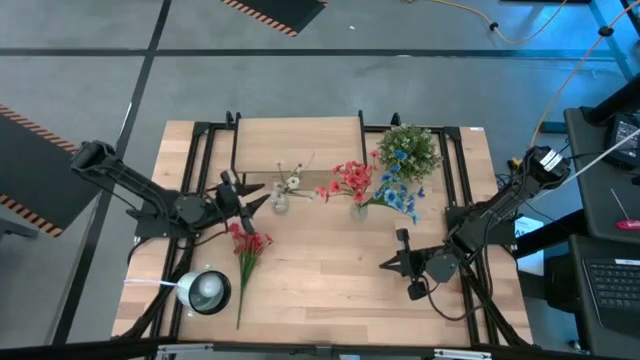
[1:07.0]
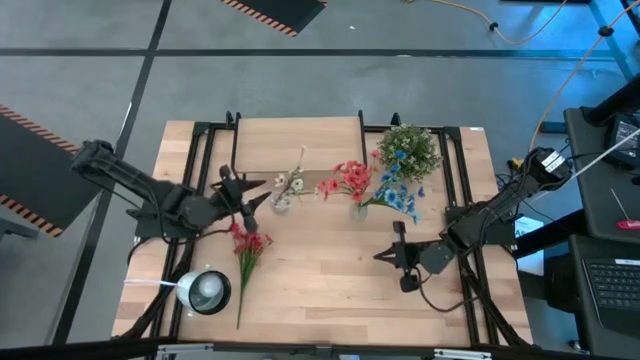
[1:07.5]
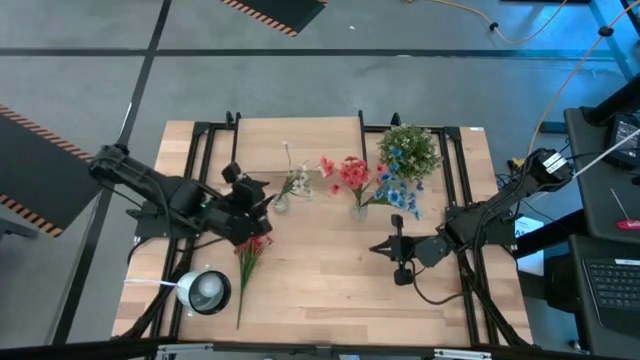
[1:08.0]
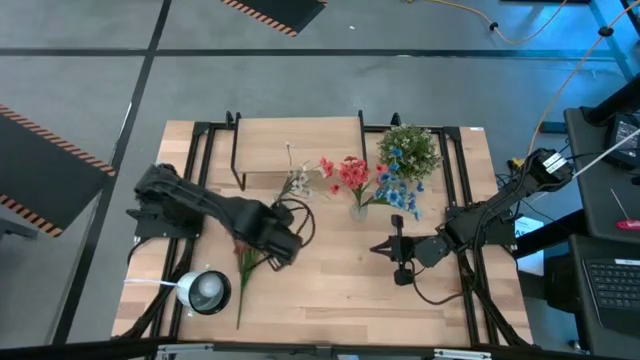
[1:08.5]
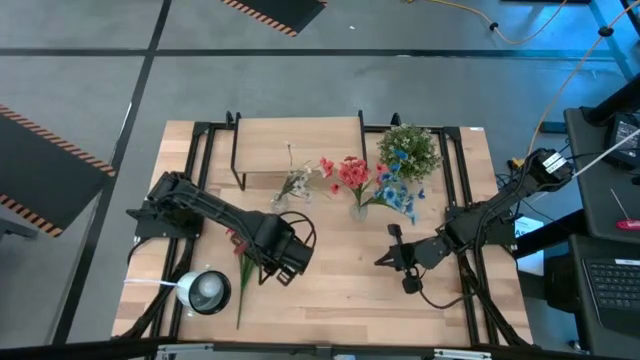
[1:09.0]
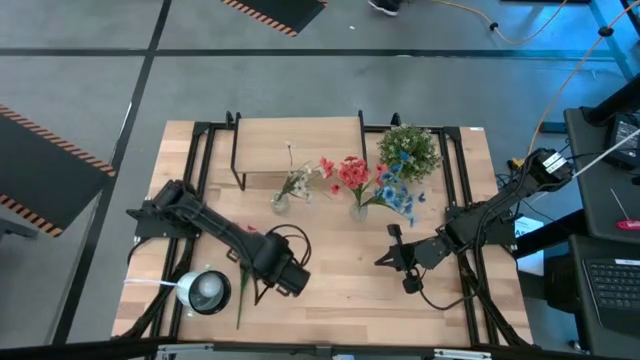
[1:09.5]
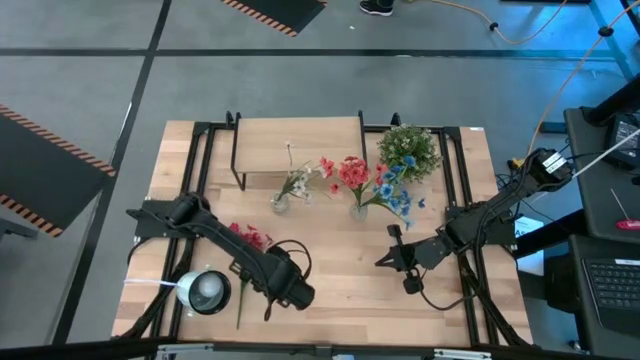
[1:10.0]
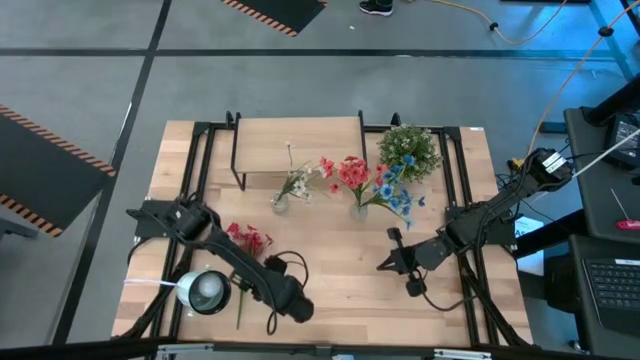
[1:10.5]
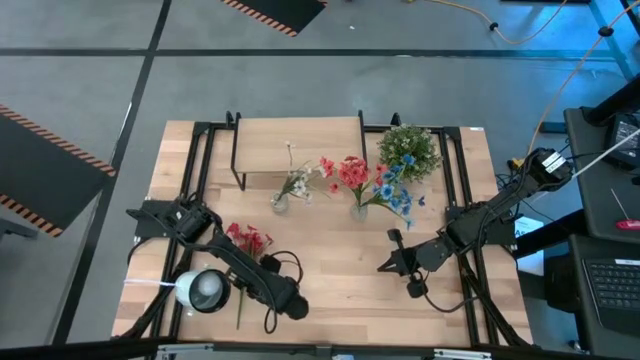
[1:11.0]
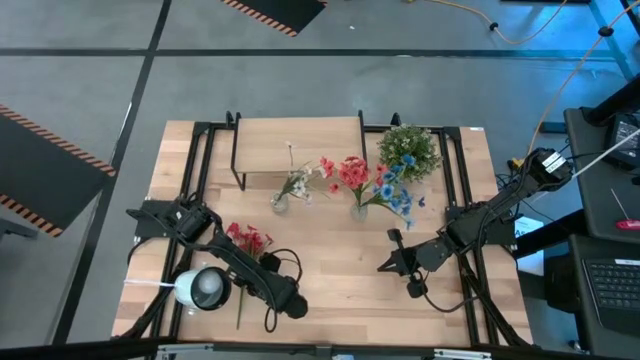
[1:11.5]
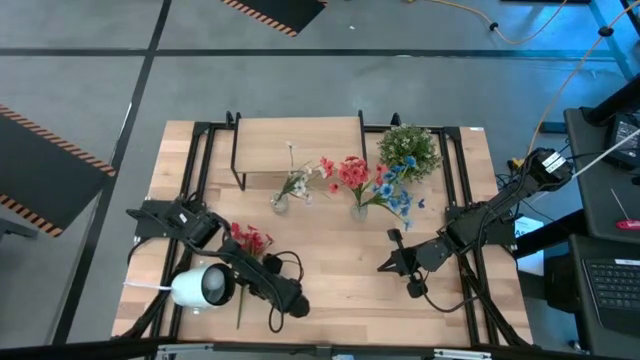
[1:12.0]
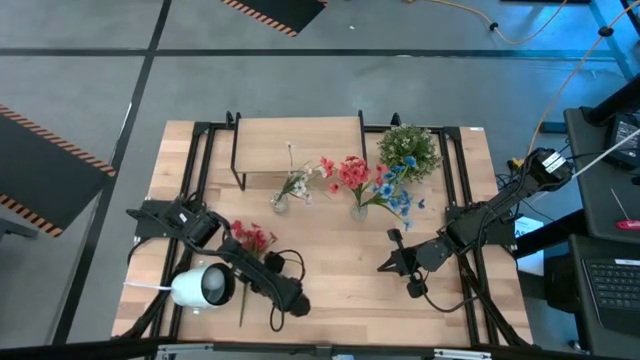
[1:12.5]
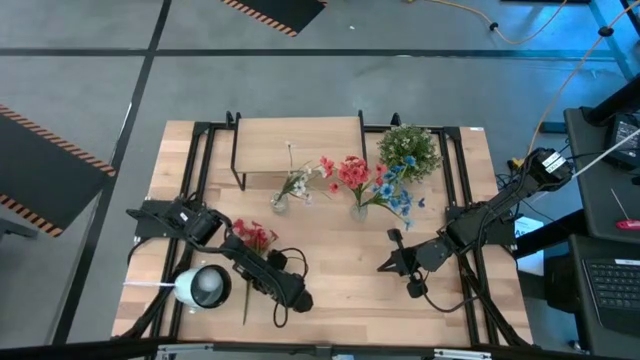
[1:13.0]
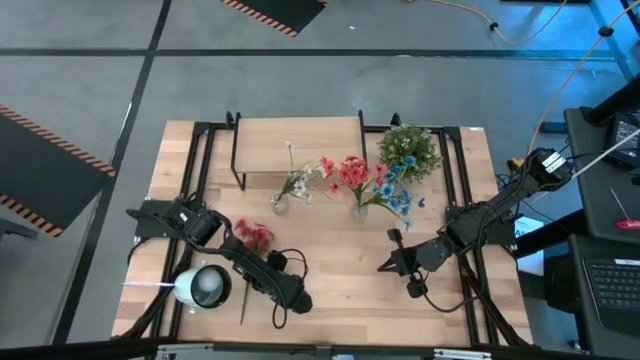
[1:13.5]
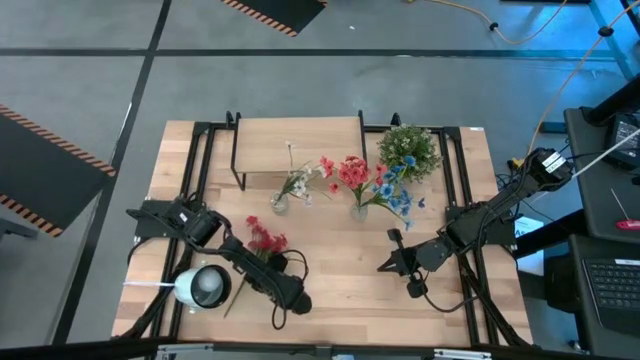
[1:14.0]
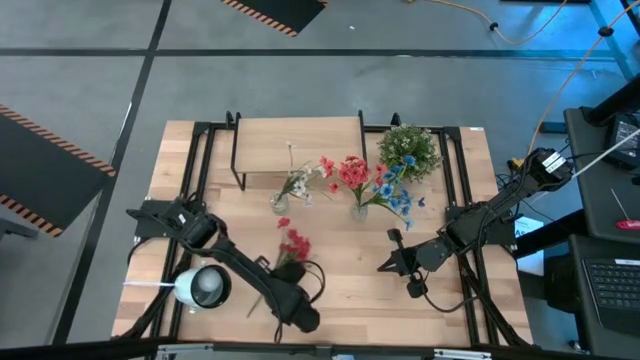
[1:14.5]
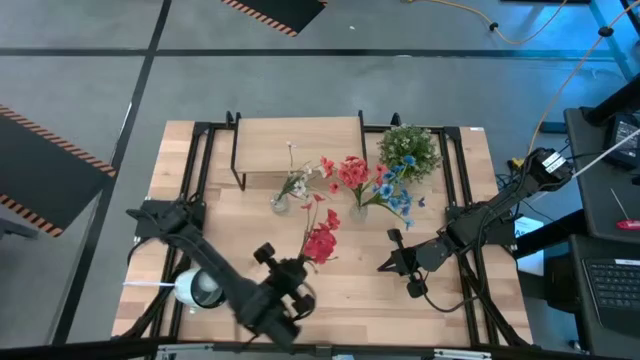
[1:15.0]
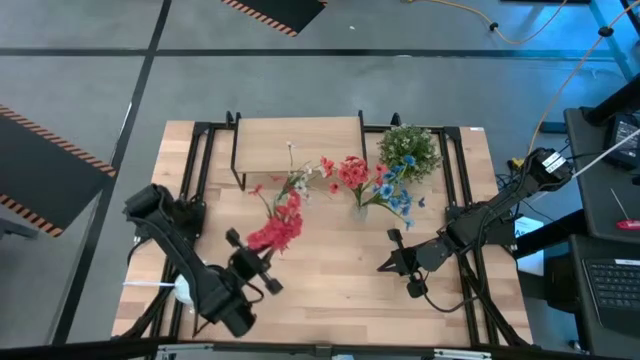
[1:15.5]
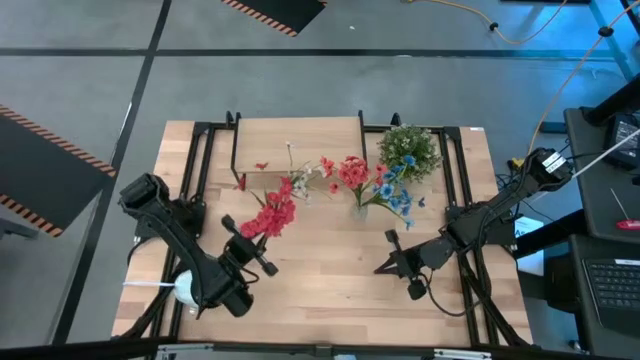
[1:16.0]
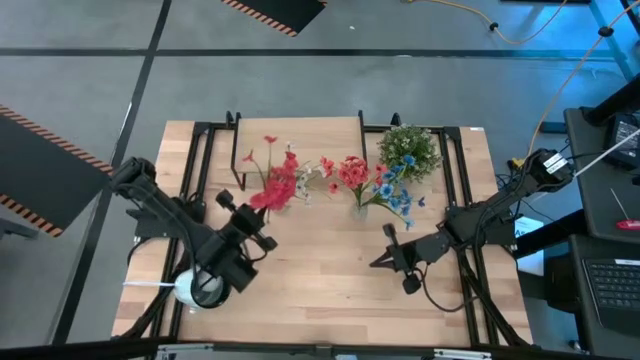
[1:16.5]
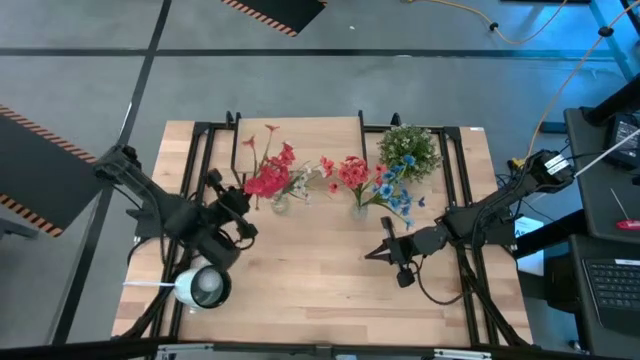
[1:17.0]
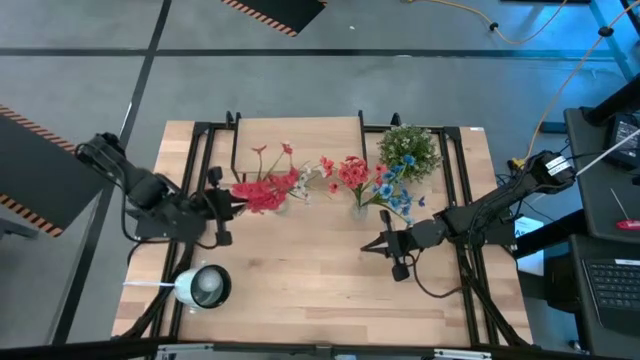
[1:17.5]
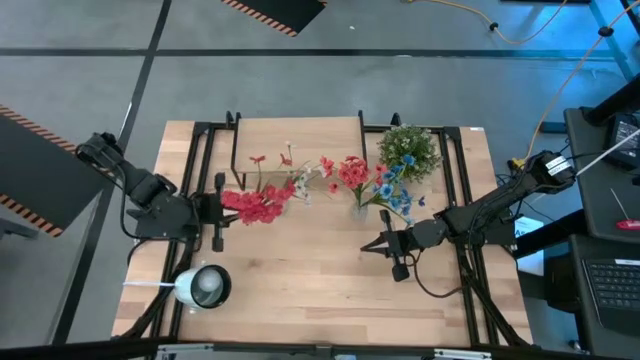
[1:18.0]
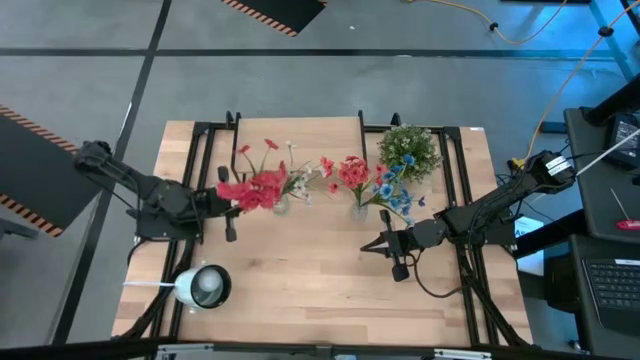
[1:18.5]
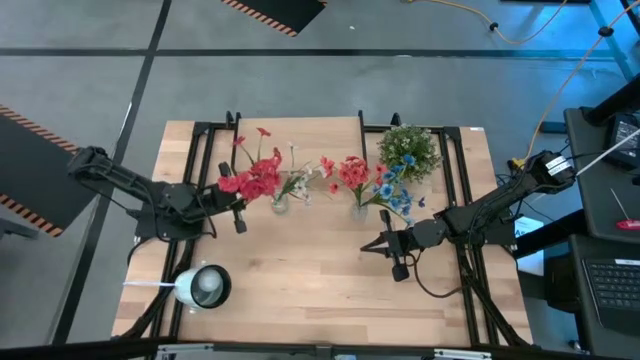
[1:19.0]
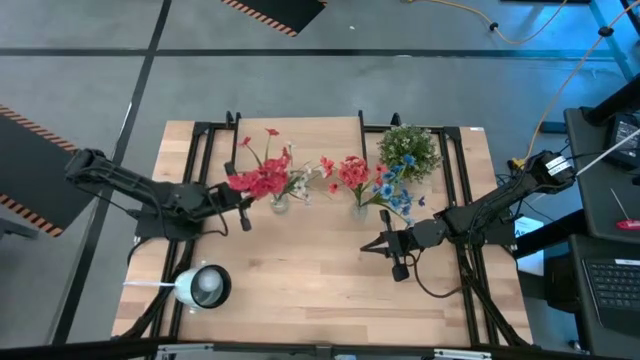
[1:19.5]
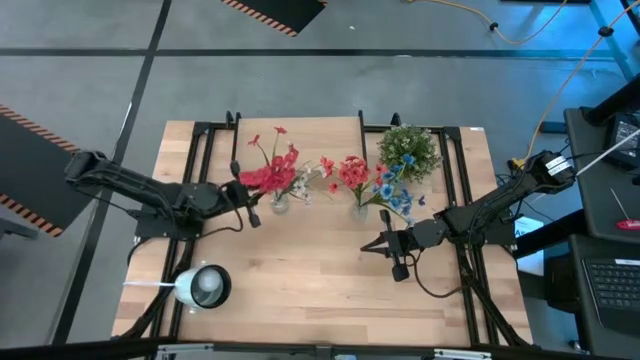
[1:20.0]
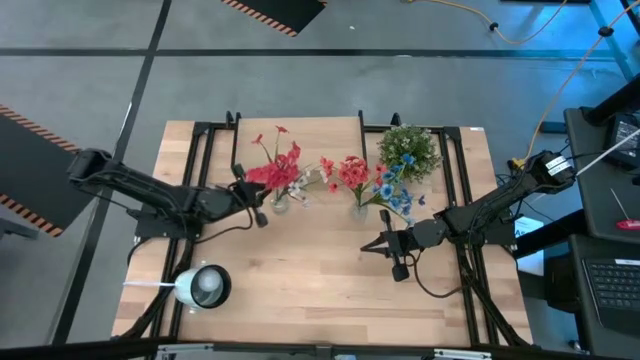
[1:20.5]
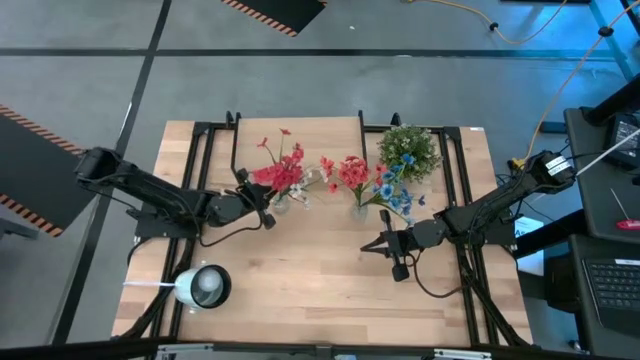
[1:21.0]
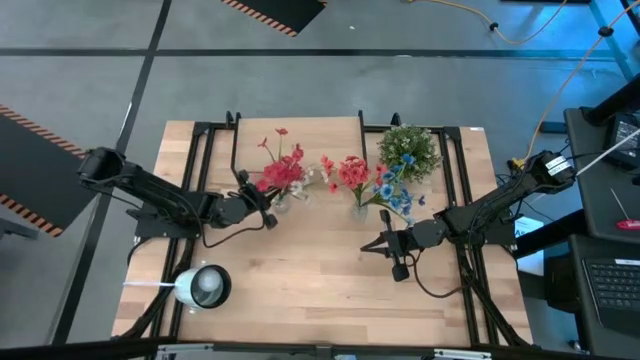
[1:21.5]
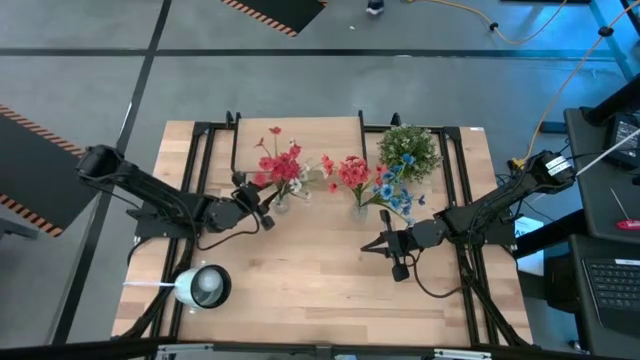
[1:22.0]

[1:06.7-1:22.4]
Task: Pick and place flowers into a vace then onto a shelf
Put the red flowers into the left transparent vase

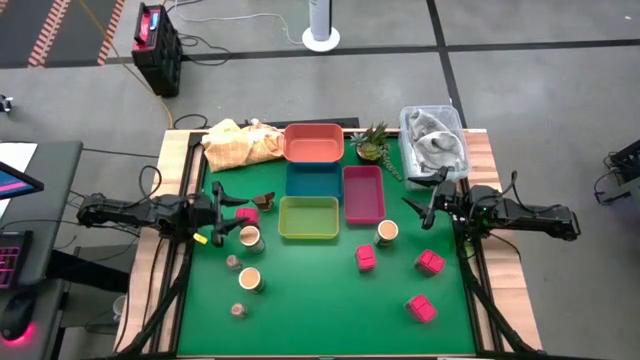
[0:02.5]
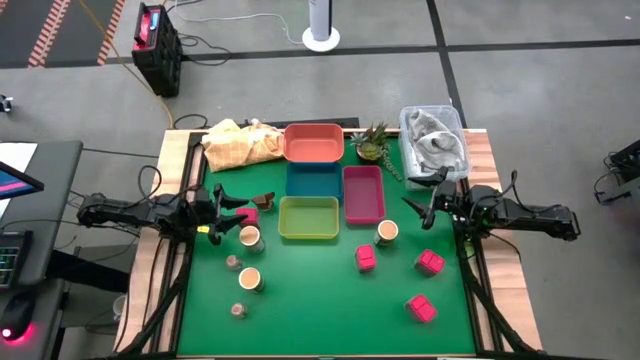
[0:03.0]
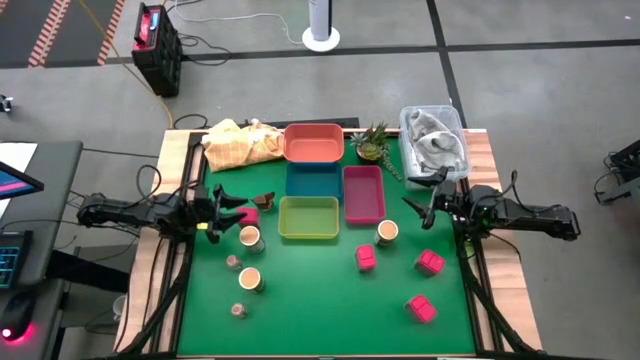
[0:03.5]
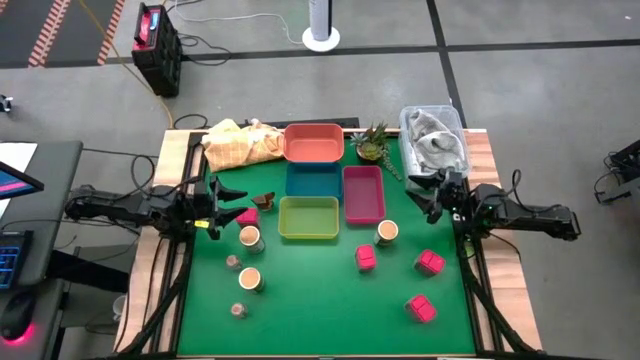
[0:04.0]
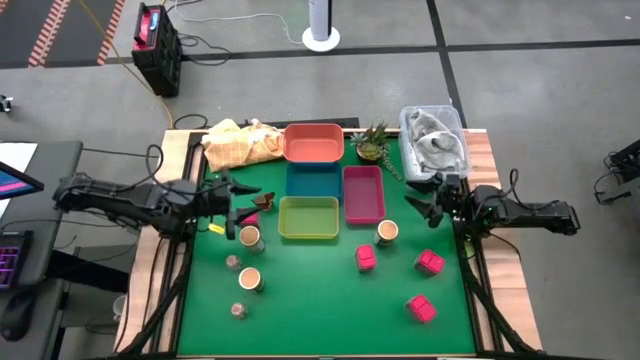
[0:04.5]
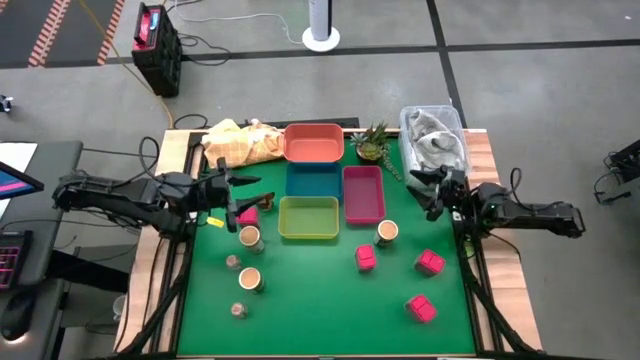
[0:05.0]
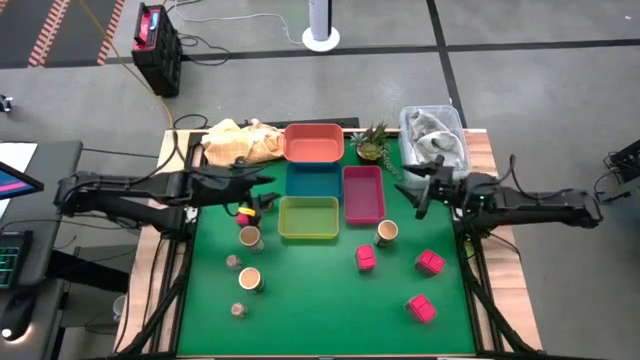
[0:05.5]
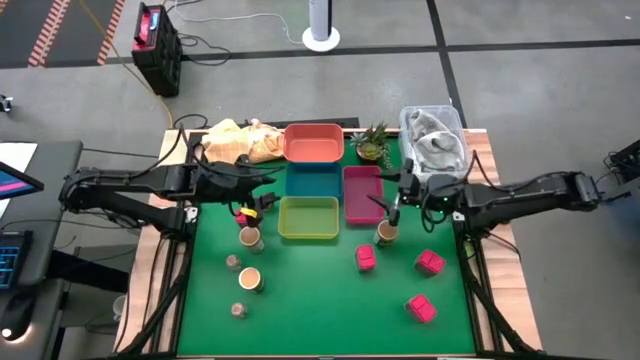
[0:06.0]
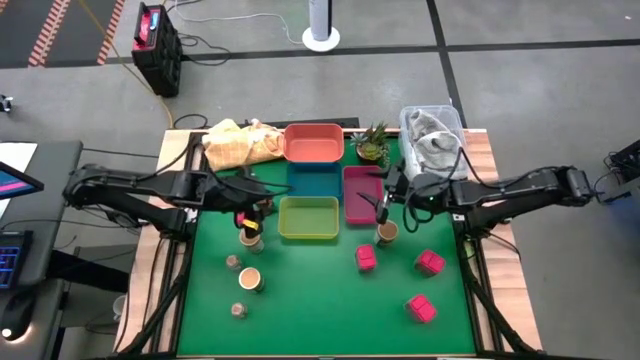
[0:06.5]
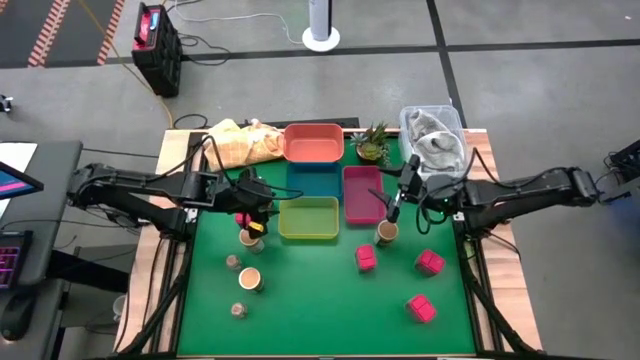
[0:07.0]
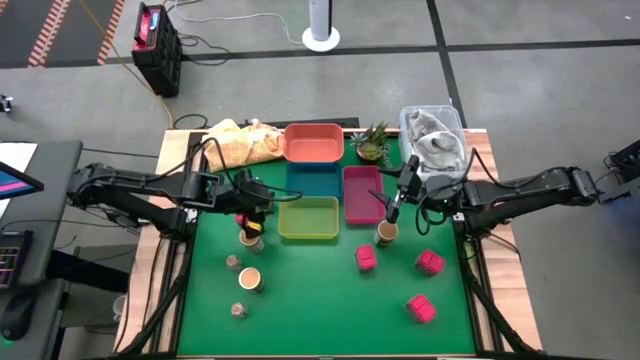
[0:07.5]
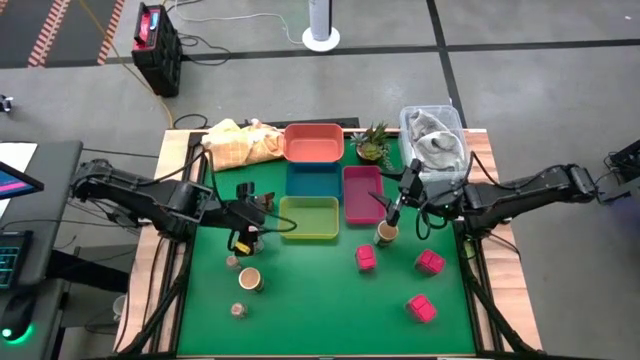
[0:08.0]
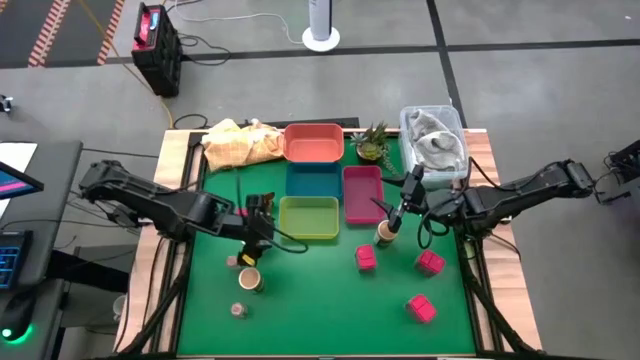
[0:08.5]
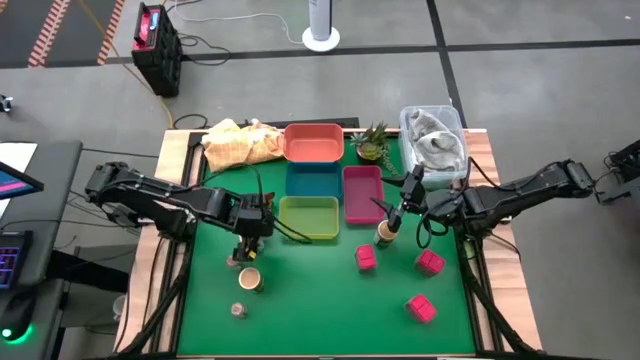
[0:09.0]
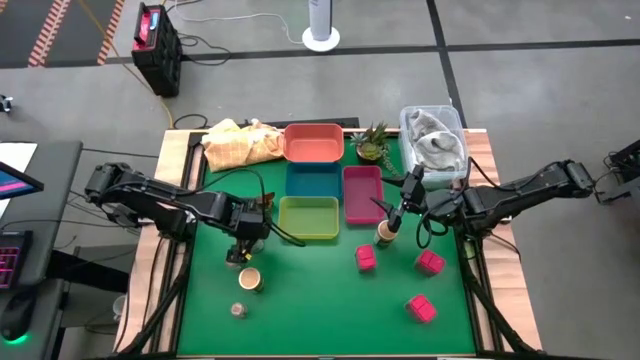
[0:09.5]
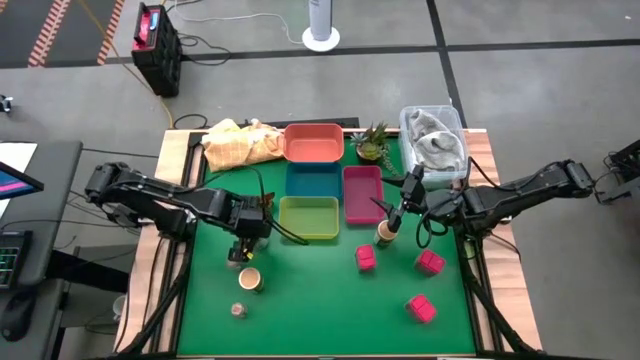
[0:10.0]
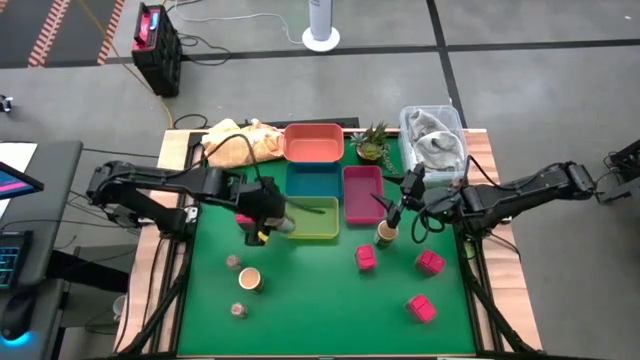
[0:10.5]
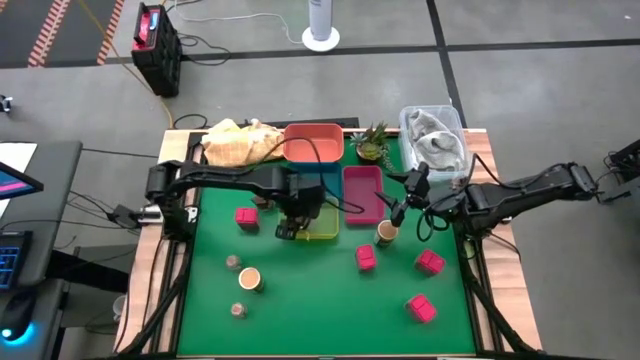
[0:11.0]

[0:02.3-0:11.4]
Task: Sort spices by type
Put the top left brown seasoning bottle into the yellow bin
